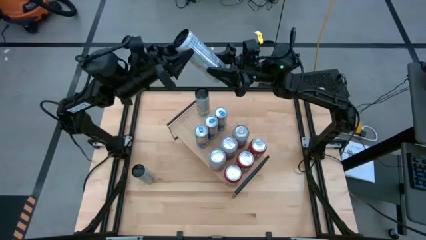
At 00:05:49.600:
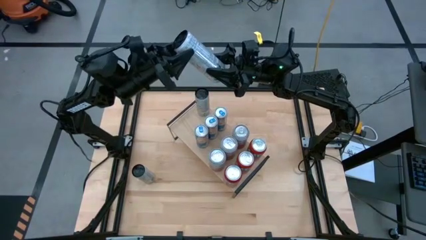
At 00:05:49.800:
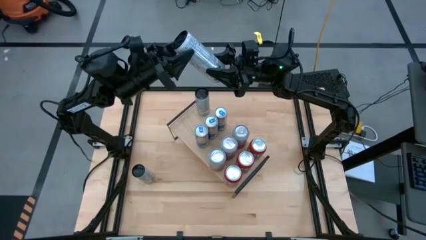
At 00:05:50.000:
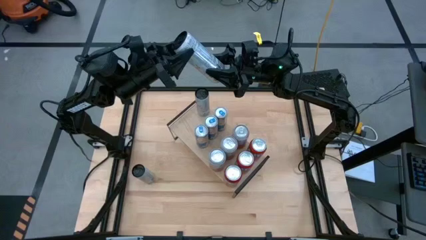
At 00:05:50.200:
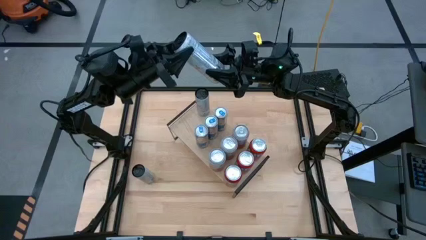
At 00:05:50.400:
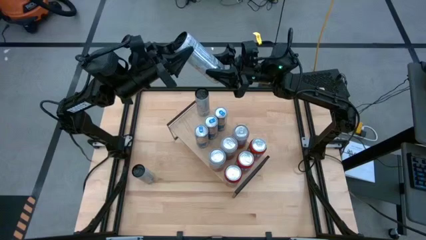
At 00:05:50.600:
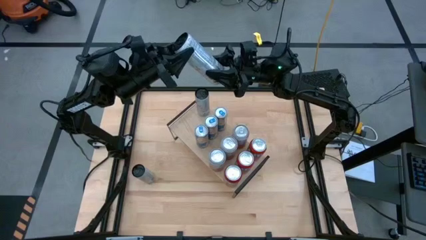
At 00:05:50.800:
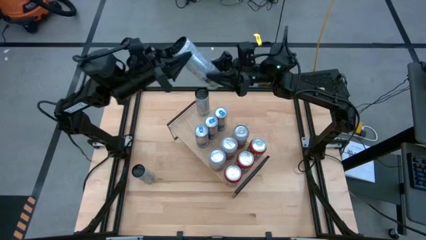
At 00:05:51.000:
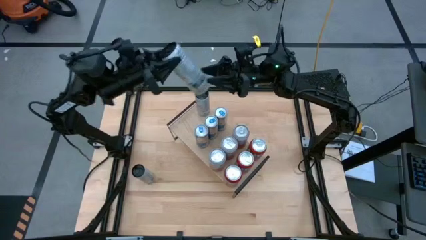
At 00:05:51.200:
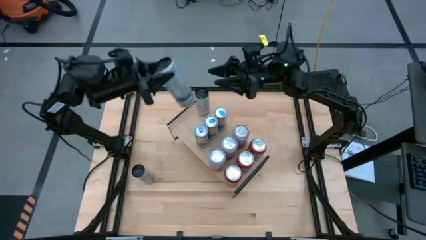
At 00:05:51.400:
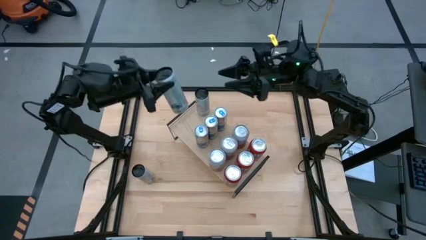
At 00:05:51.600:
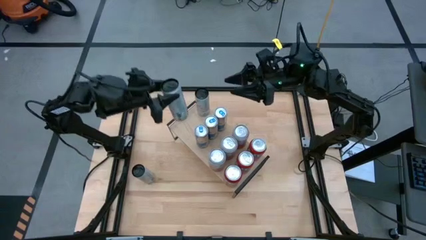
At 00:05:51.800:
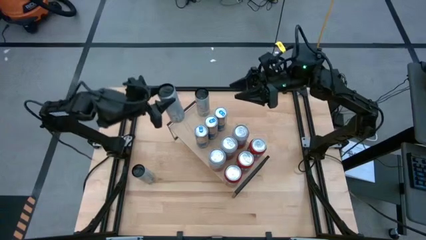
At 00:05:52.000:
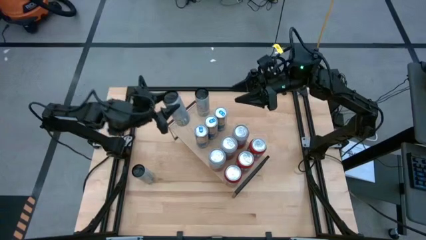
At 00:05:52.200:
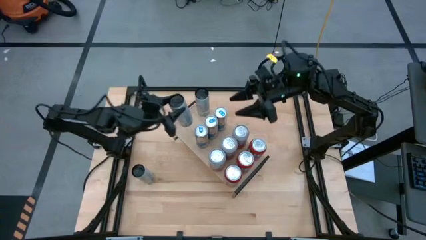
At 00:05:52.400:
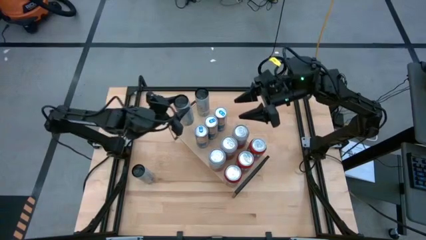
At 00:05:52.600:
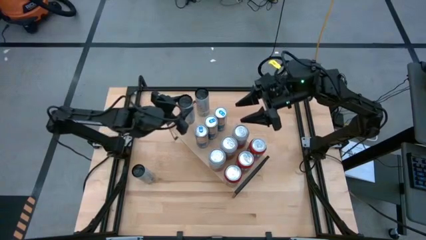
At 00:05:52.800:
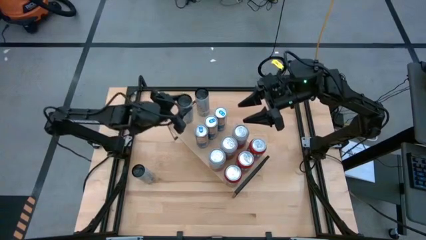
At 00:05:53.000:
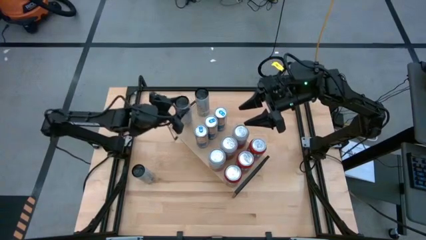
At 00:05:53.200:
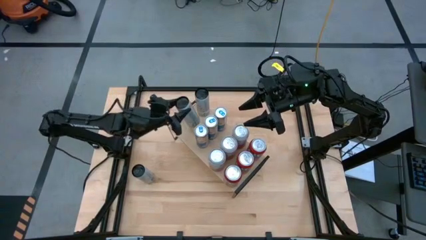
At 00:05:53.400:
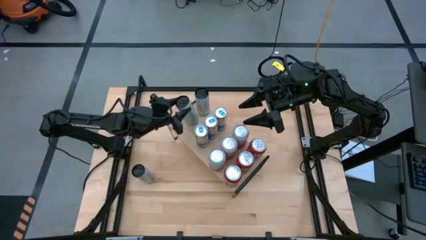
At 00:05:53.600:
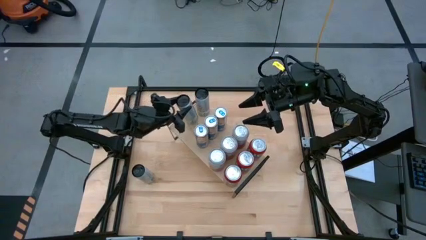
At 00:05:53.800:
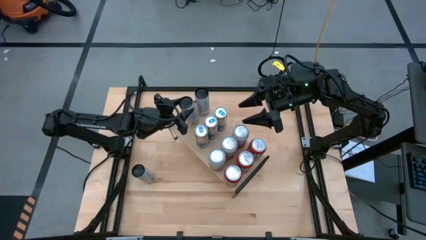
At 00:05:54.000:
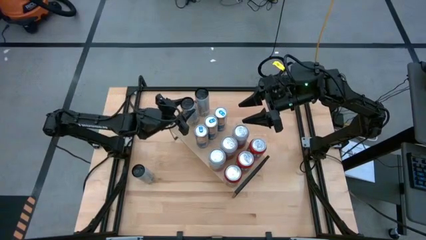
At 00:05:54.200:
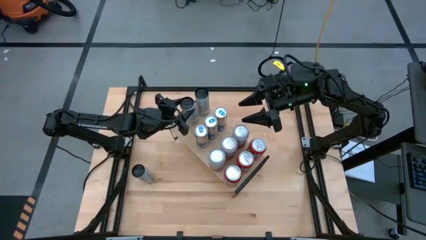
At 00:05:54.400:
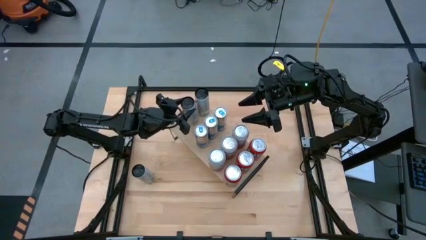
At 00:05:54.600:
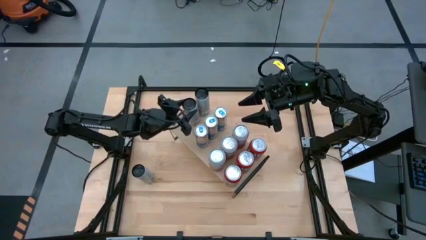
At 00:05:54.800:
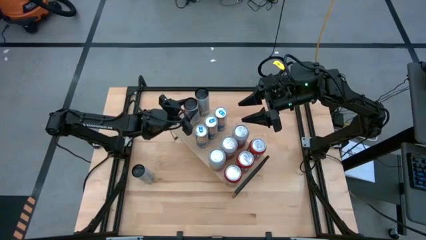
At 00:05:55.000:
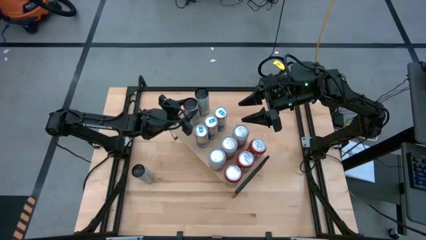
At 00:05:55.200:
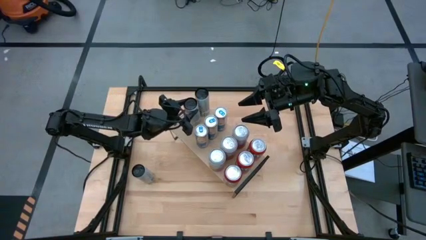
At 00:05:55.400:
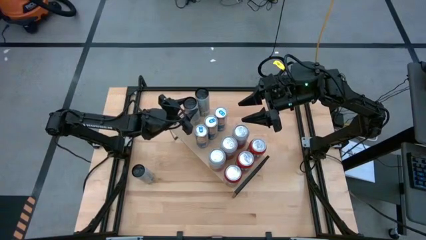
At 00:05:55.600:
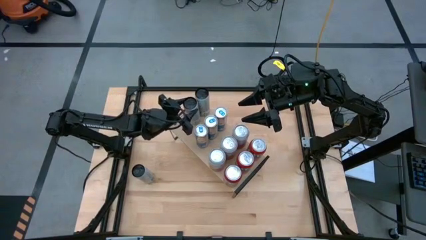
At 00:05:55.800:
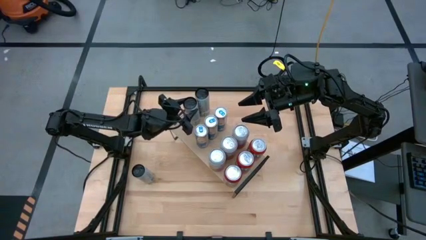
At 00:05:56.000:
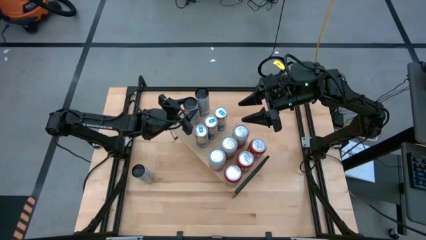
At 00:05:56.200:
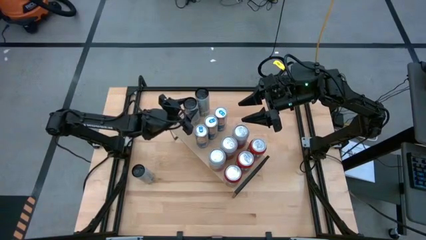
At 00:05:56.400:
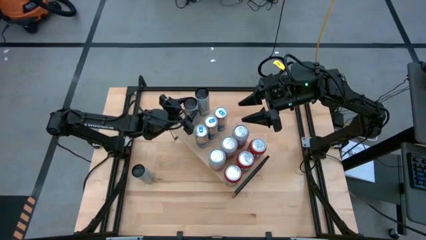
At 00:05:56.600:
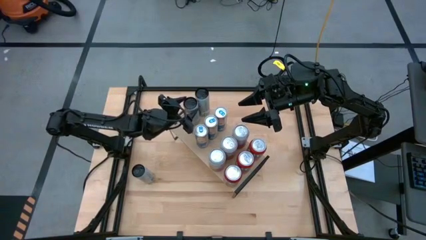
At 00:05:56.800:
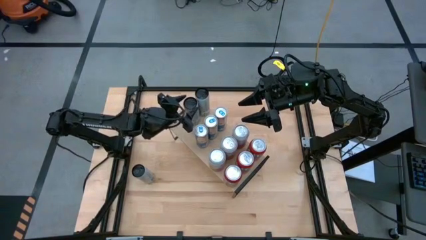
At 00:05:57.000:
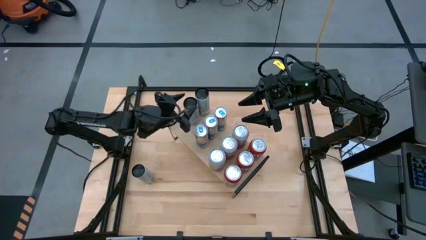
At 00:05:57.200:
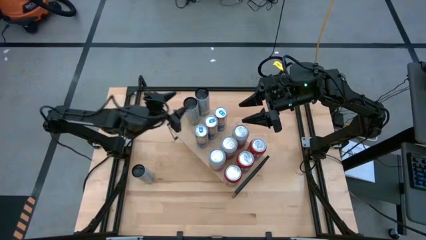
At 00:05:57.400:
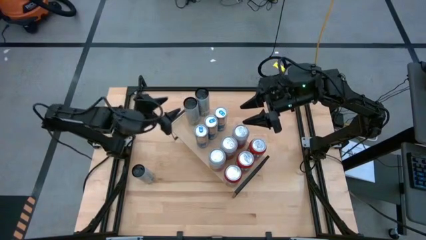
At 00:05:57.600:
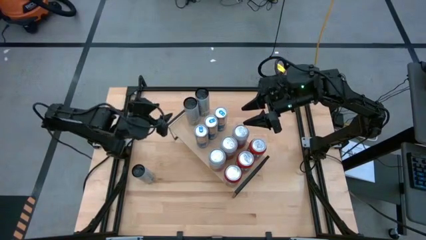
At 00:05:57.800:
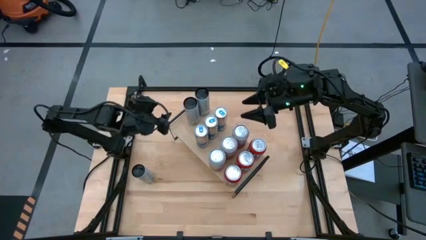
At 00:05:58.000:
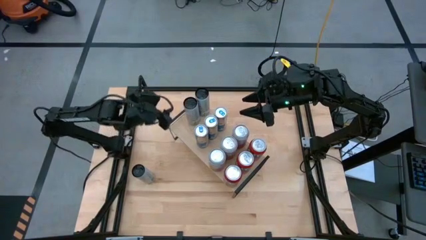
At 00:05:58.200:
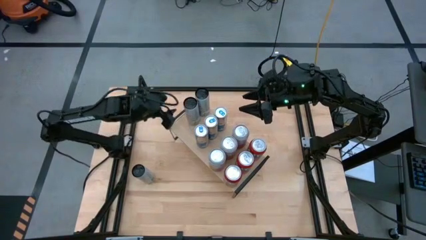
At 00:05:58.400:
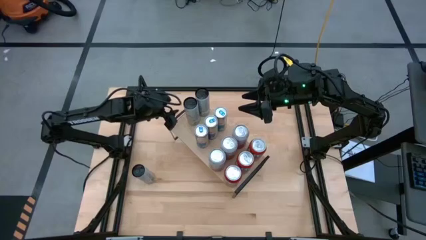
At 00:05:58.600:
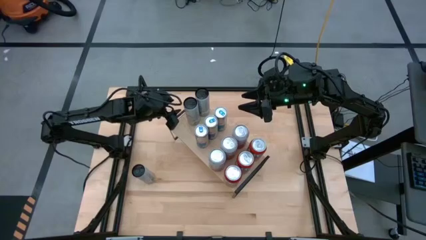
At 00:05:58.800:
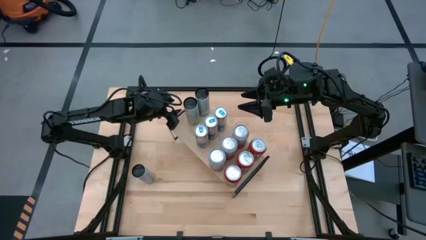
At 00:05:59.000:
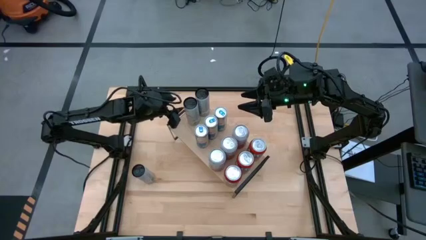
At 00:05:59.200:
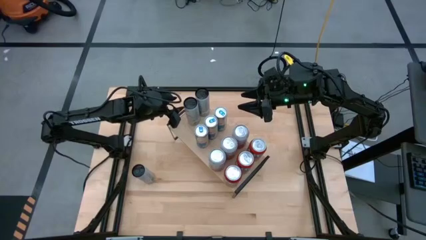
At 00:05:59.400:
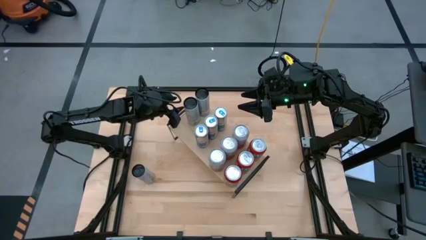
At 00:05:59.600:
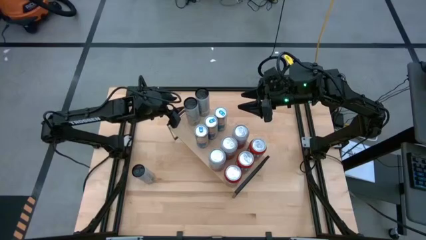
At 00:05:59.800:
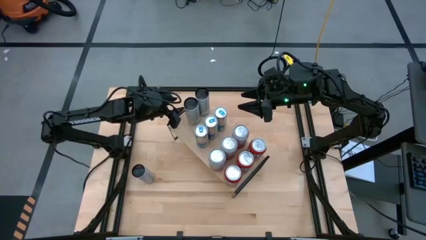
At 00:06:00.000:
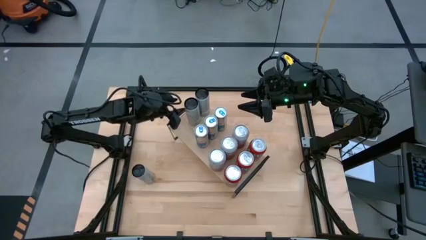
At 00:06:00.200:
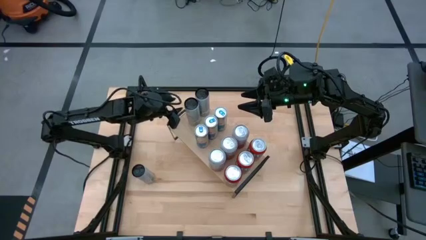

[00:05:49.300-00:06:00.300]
Task: Place canned beverage on shelf
Put the top white yellow soda can on the shelf aligned with the other white yellow soda can

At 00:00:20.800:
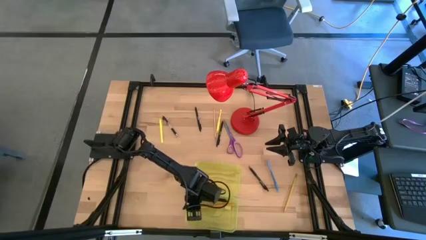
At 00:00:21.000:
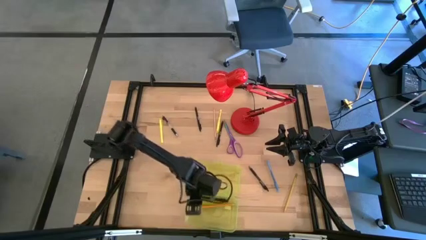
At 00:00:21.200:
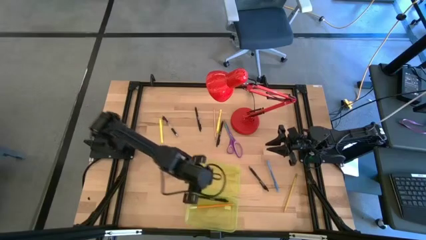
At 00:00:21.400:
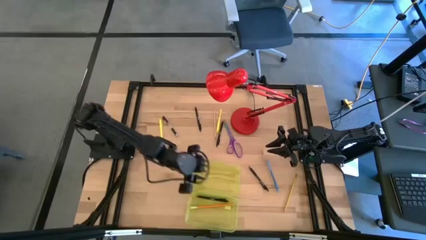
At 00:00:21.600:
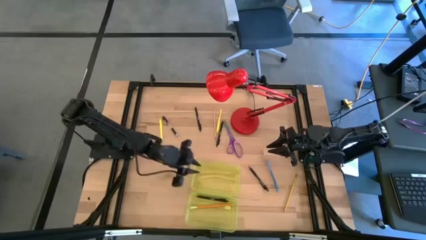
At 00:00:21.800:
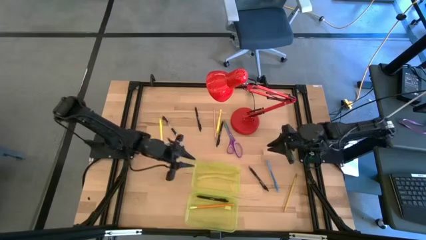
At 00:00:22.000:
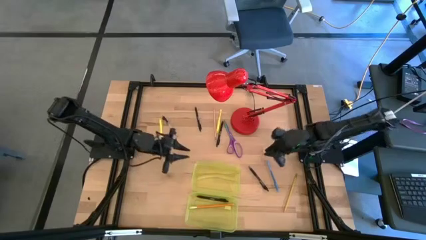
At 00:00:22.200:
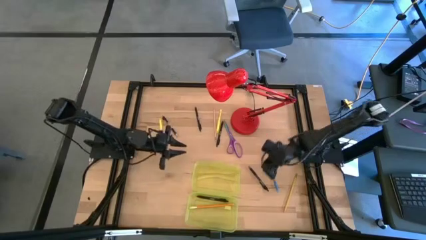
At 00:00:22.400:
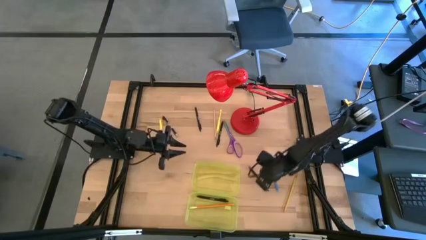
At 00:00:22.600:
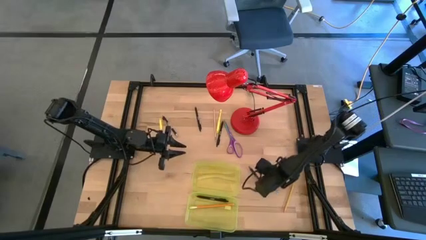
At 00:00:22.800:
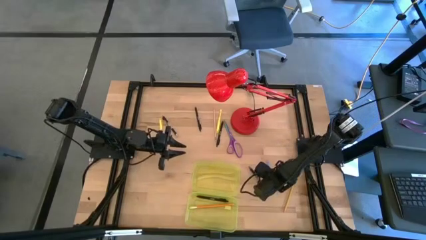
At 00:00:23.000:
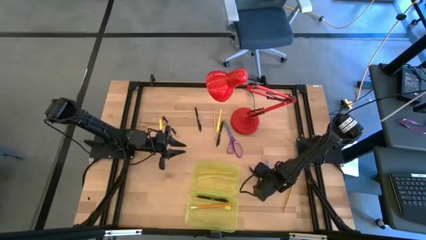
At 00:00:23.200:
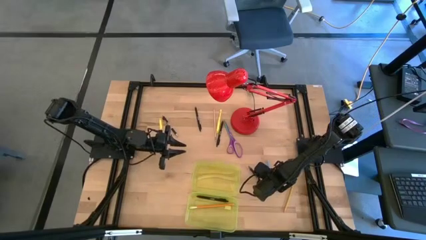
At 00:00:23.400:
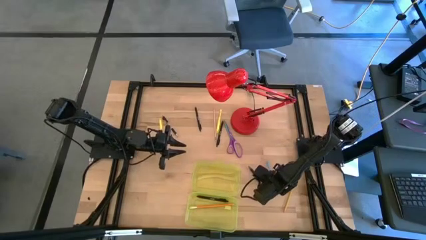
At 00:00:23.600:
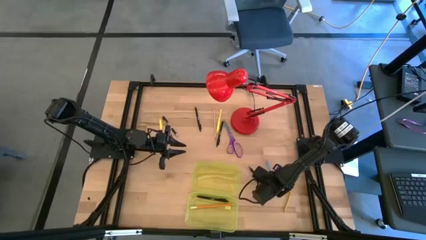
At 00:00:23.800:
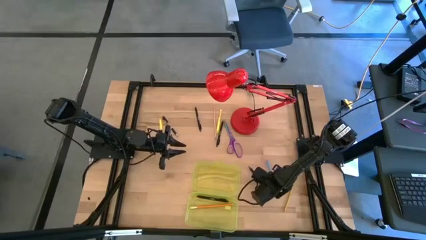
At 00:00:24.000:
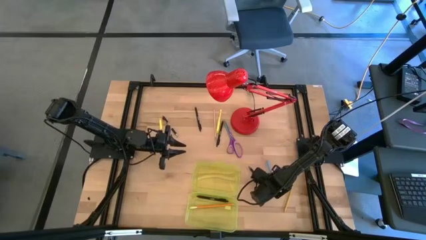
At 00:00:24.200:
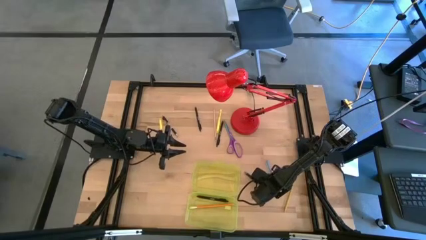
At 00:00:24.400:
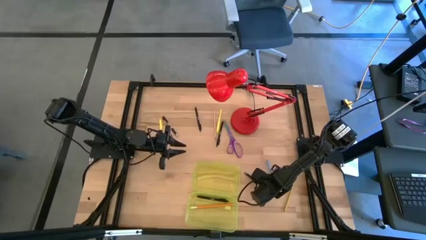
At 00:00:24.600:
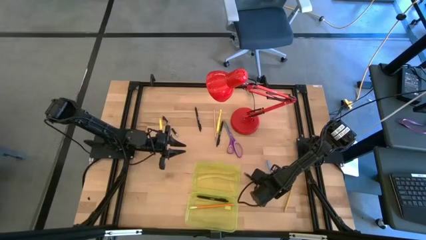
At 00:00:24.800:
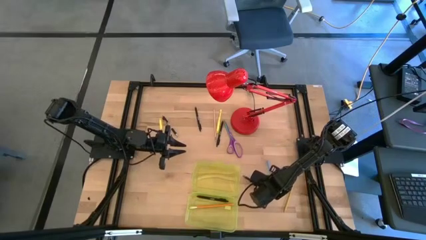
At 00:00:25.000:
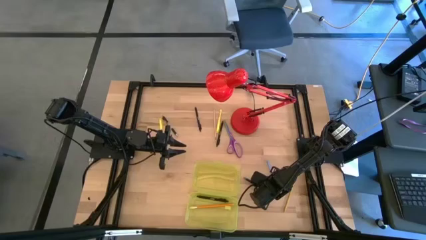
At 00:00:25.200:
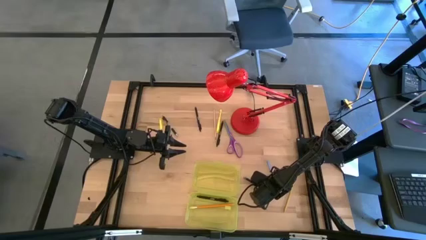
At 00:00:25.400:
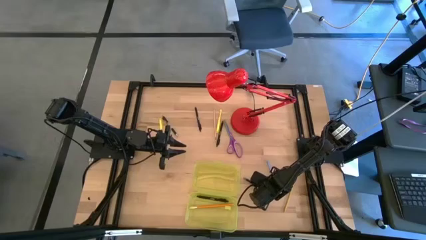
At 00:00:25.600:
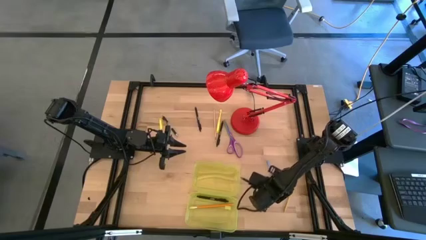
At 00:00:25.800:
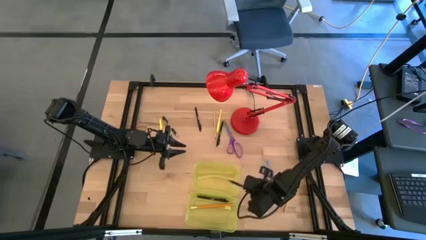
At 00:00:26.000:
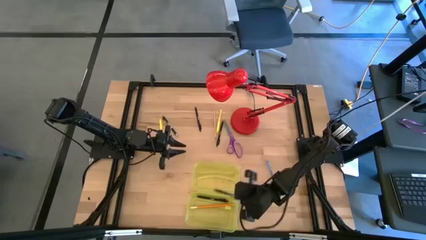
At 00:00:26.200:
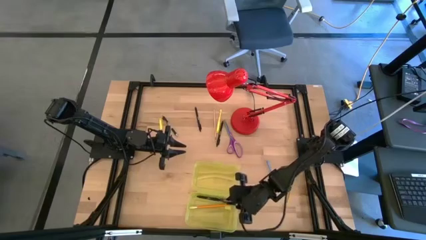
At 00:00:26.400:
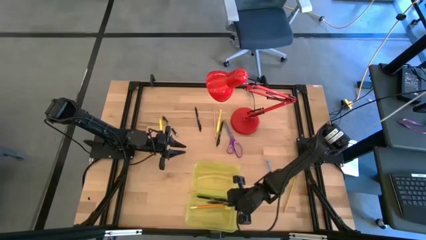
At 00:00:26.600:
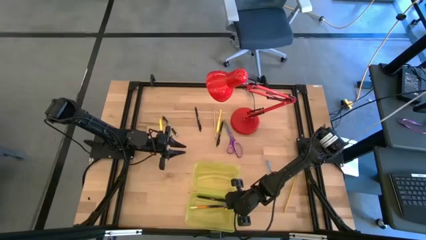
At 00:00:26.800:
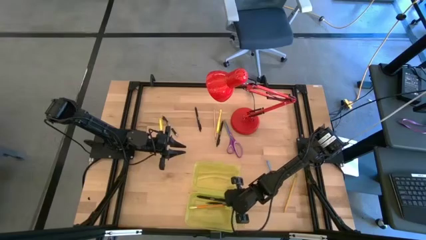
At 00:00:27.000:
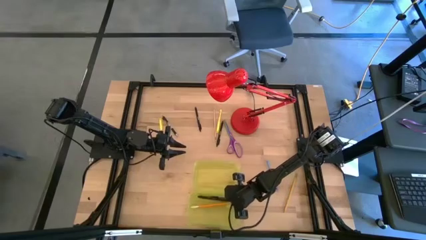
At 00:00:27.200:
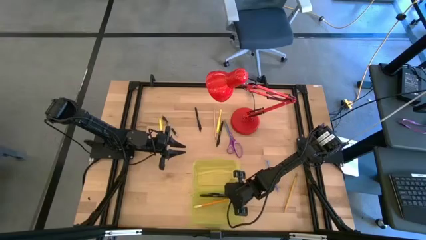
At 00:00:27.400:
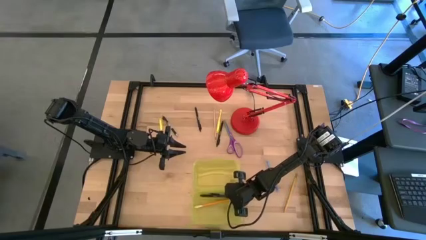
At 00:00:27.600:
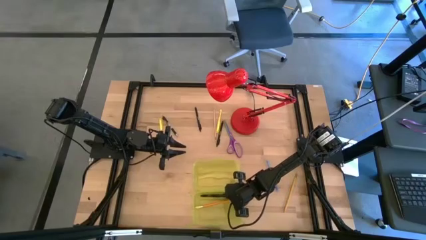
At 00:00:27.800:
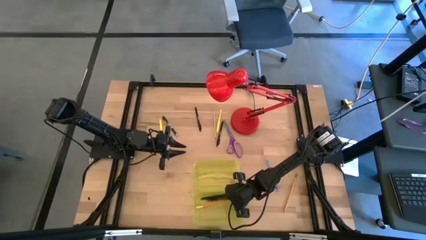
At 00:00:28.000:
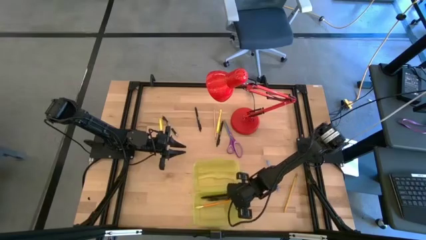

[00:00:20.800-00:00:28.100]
Task: Pick & place school supplies into a supply box
Put the black pen into the yellow supply box
